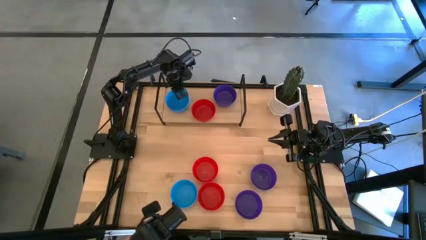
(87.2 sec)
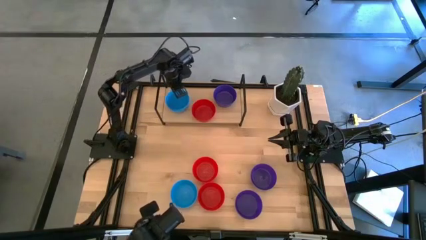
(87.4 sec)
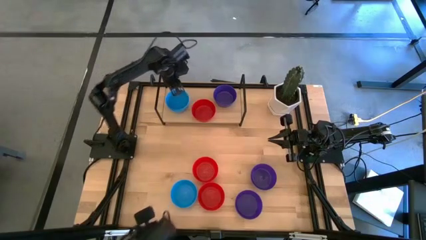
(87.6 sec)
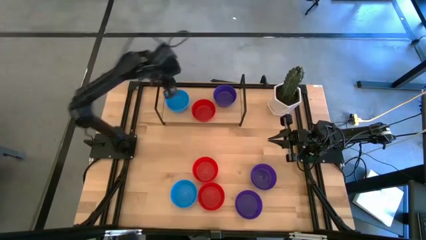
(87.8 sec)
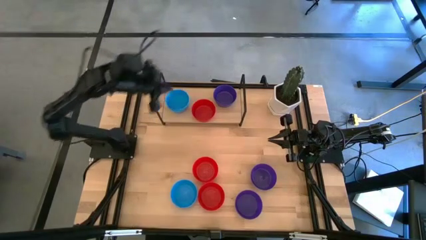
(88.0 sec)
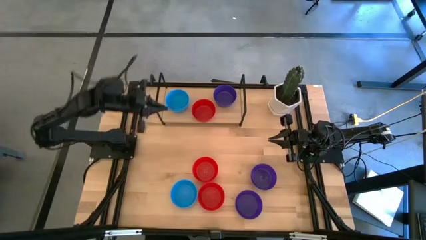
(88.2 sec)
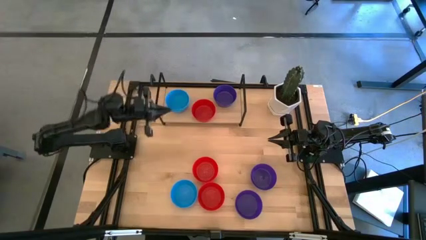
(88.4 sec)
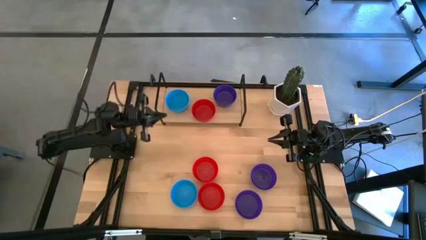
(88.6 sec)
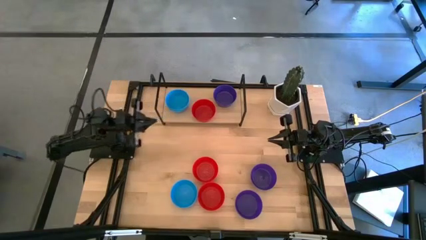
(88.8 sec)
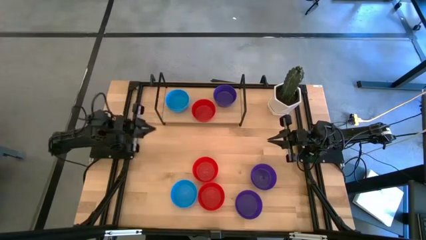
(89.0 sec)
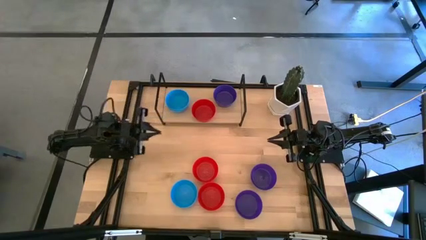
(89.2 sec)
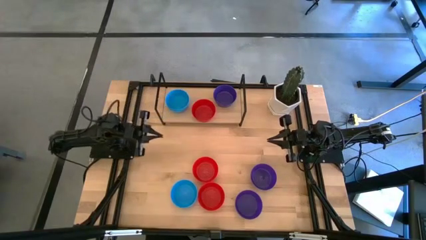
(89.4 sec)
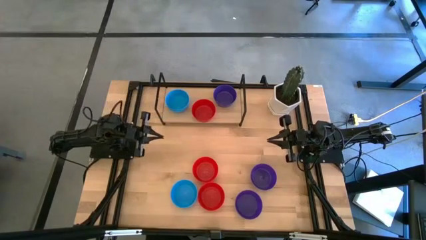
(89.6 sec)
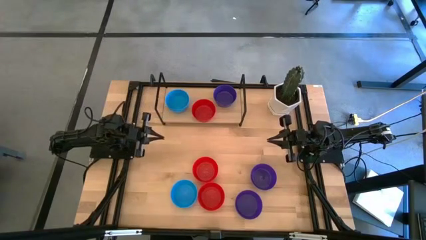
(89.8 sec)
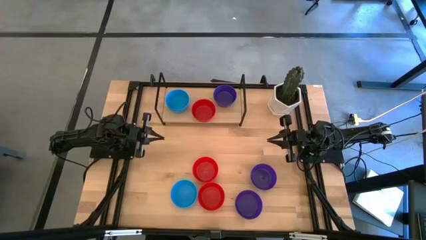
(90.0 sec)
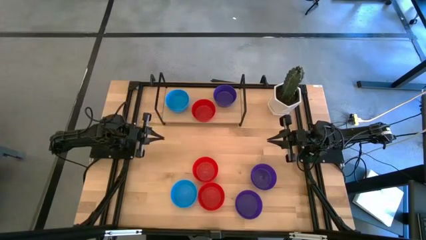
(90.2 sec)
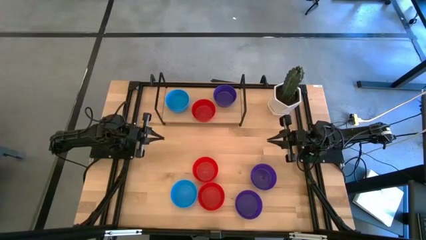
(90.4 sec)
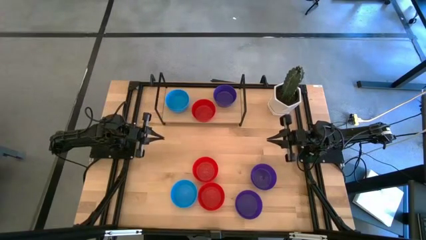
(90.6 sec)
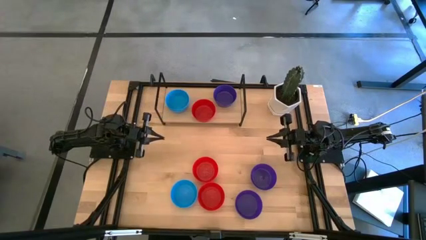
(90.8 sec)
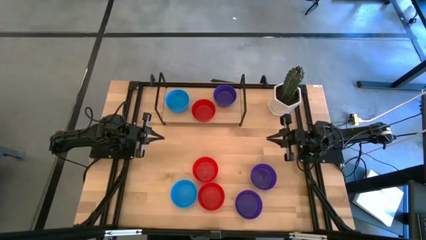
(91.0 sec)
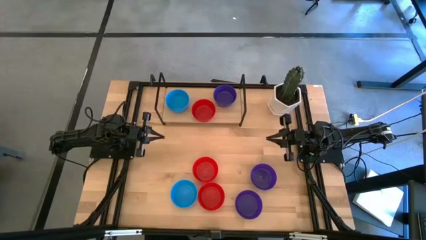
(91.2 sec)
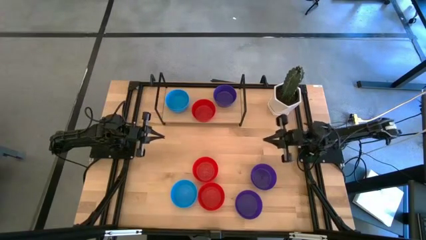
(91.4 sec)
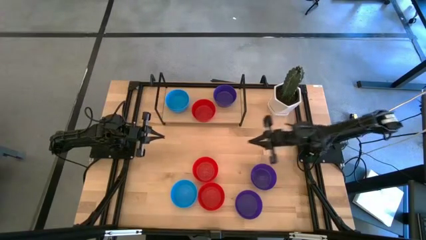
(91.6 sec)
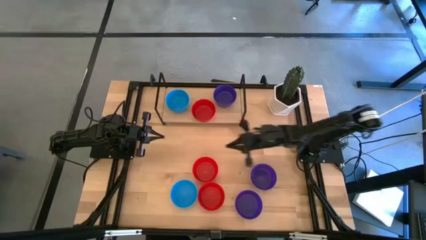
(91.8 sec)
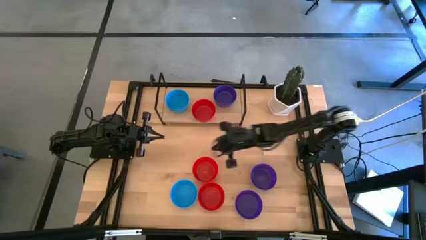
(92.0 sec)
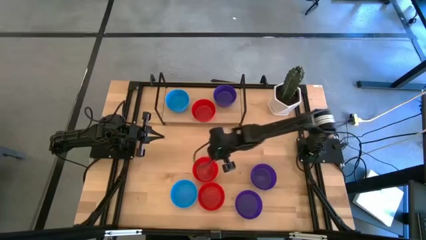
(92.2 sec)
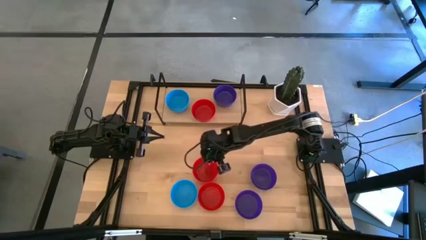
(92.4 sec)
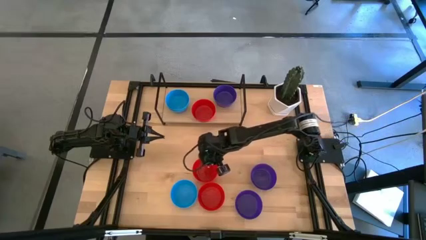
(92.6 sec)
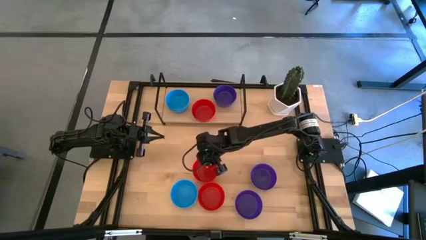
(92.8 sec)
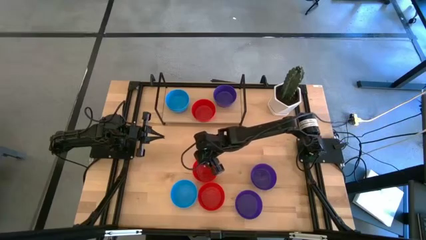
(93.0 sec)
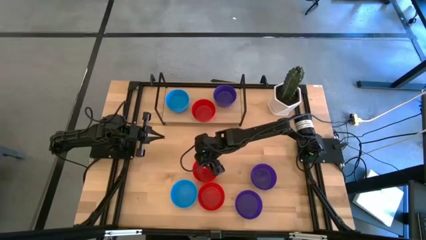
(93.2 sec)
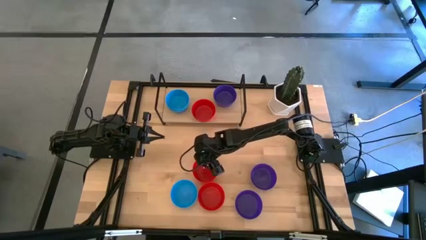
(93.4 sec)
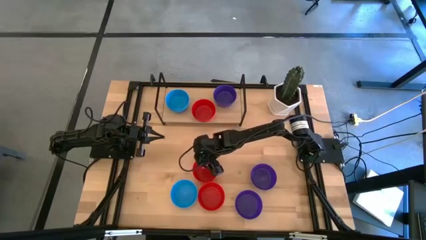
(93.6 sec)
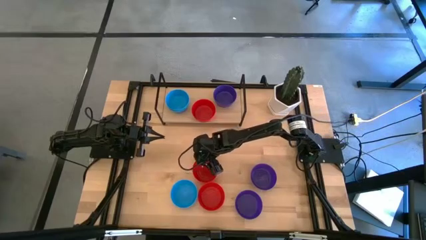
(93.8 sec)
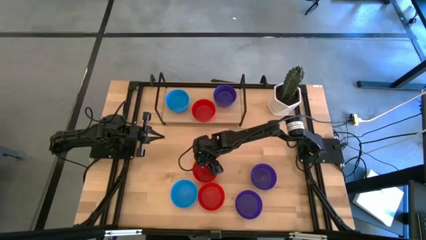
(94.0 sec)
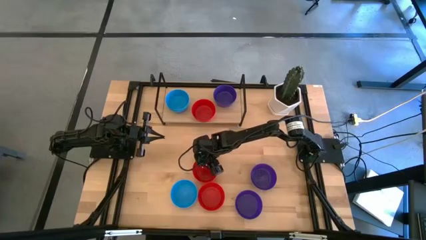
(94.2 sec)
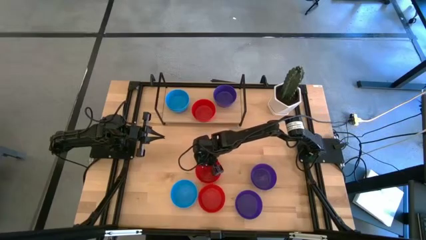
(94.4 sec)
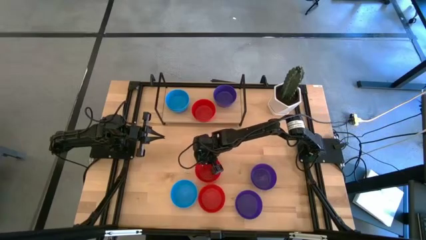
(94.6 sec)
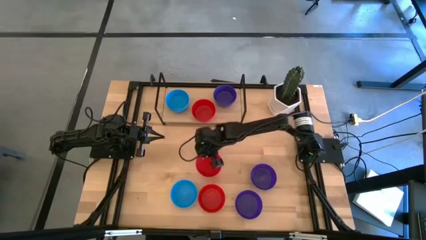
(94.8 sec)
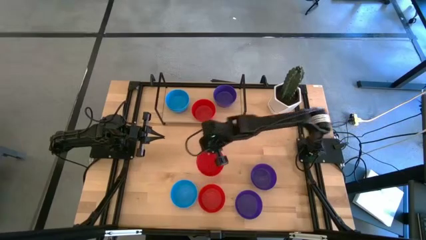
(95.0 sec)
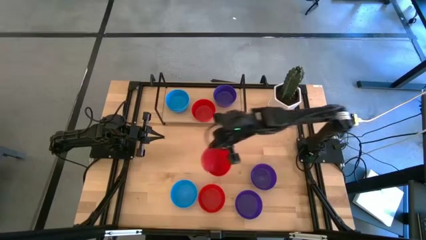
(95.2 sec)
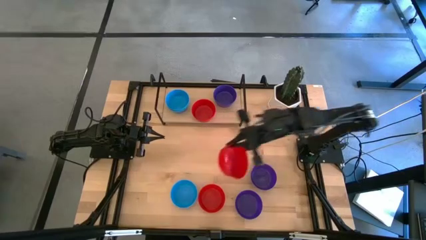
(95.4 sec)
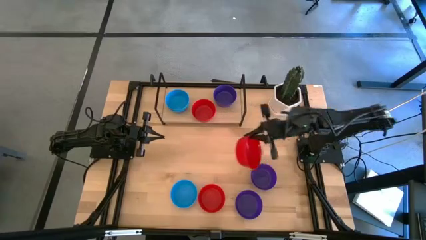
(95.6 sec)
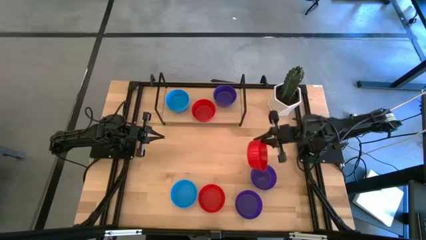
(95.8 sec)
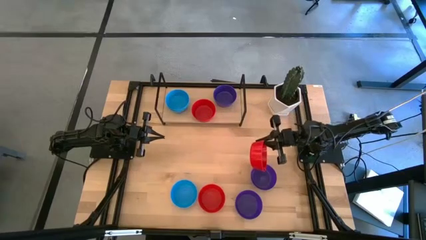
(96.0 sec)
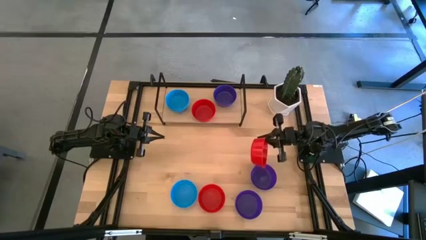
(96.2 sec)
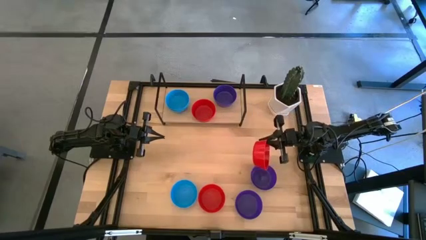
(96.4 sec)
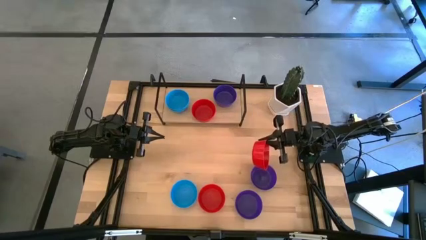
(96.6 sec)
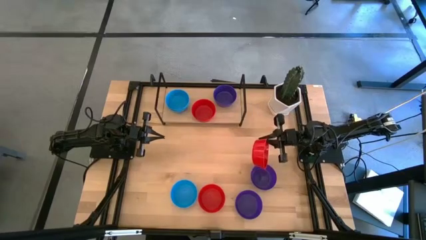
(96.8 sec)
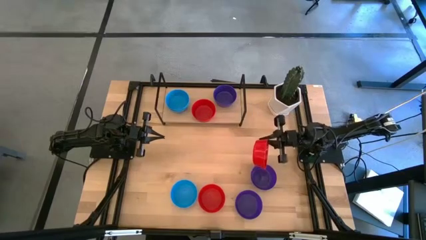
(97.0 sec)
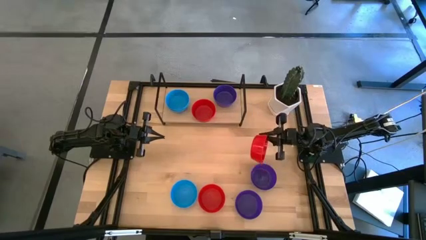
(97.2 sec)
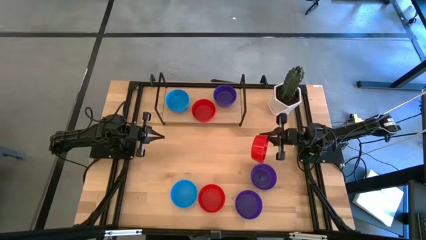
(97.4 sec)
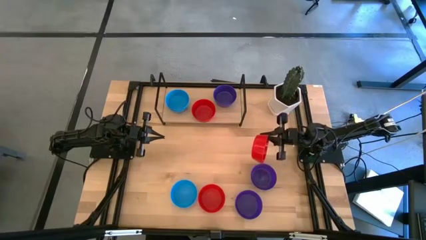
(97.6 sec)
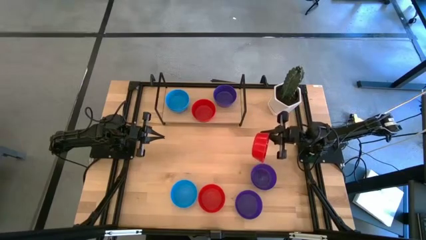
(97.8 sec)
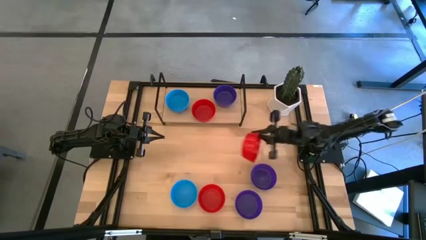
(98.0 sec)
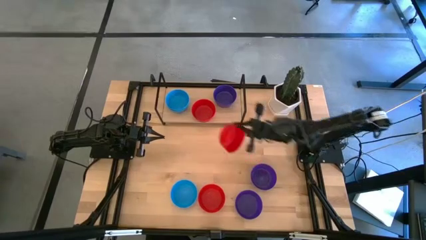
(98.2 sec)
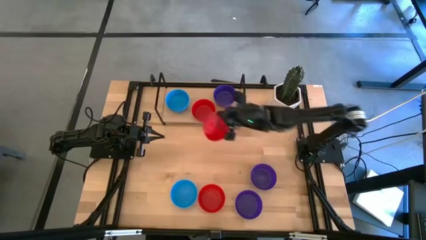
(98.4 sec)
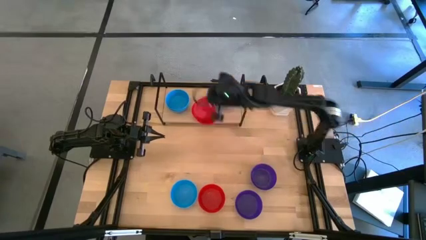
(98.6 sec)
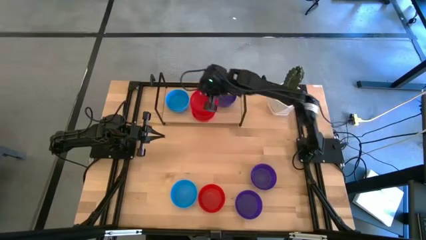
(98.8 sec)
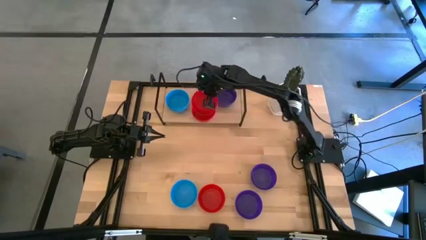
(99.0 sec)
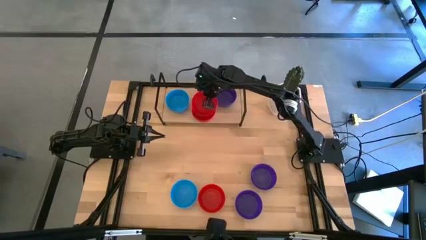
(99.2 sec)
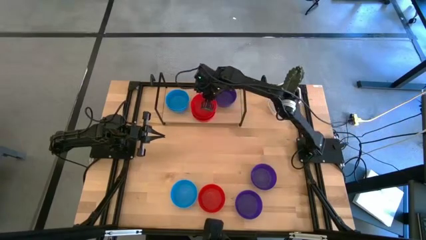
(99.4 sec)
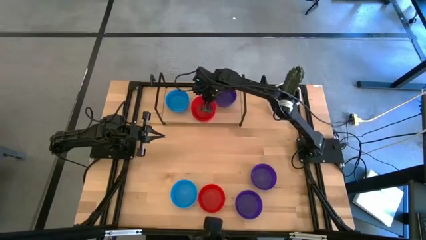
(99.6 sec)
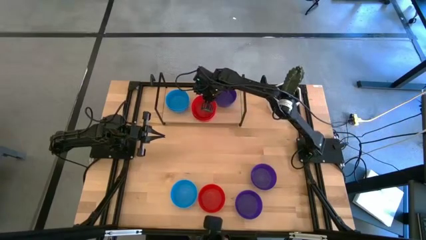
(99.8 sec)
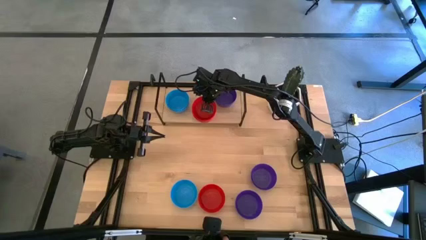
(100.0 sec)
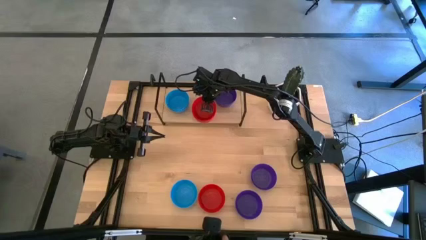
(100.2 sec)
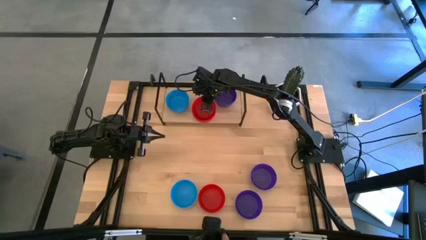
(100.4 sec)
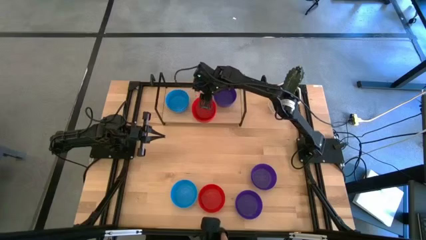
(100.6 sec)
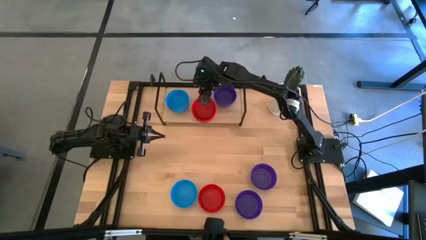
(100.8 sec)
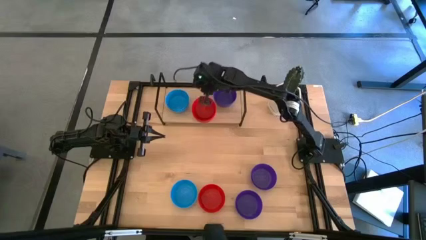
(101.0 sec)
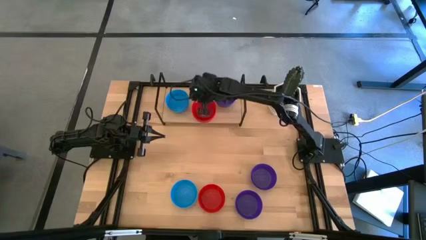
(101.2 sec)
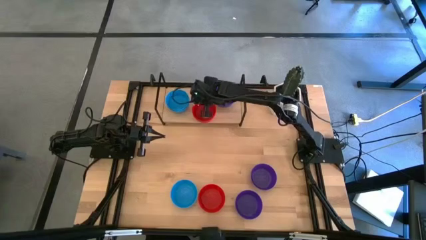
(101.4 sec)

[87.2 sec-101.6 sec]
Task: Pick & Place Mini bowls
Stack the red bowl on top of the red bowls on the shelf

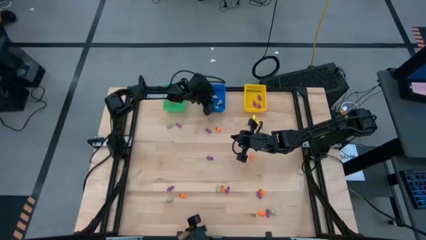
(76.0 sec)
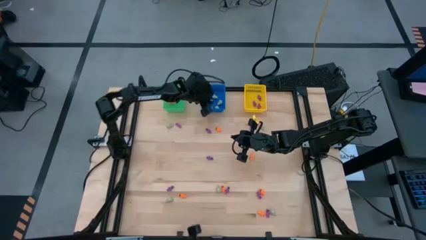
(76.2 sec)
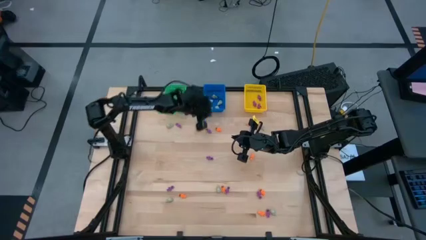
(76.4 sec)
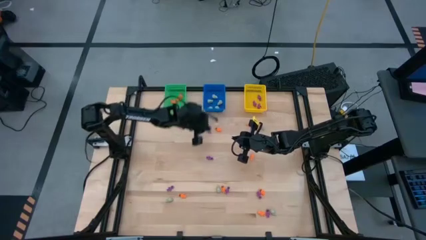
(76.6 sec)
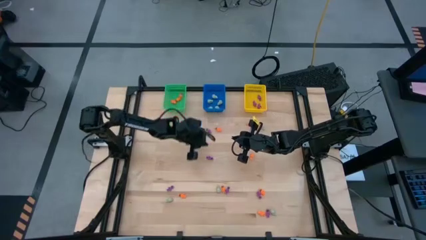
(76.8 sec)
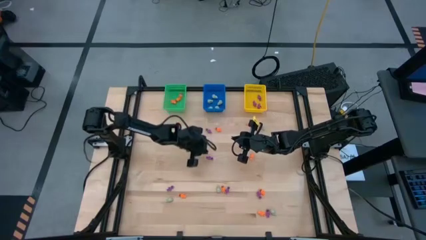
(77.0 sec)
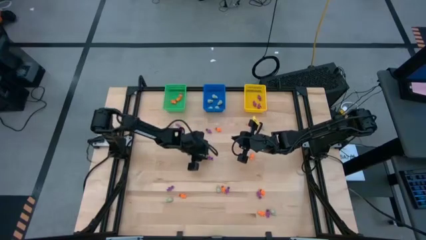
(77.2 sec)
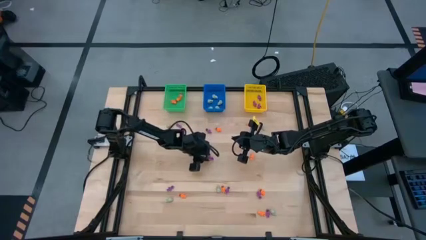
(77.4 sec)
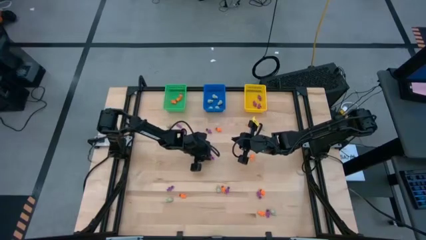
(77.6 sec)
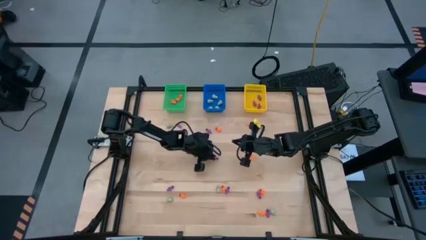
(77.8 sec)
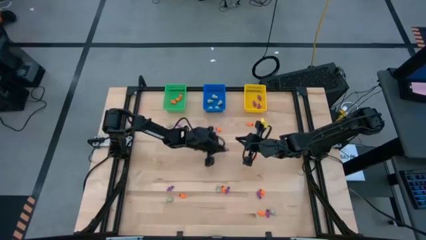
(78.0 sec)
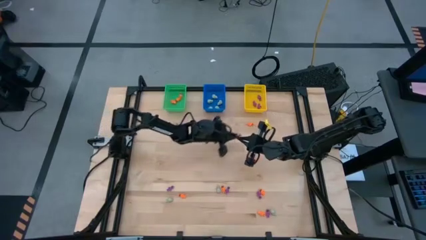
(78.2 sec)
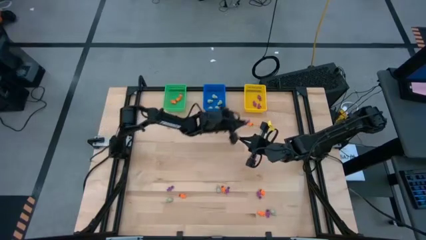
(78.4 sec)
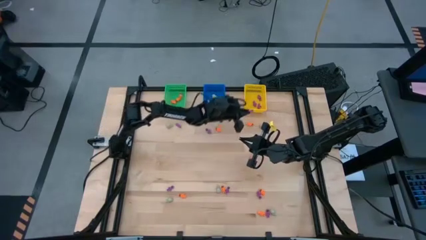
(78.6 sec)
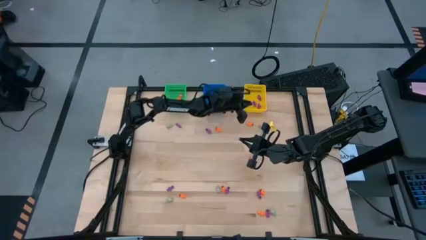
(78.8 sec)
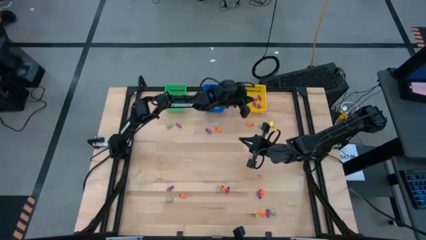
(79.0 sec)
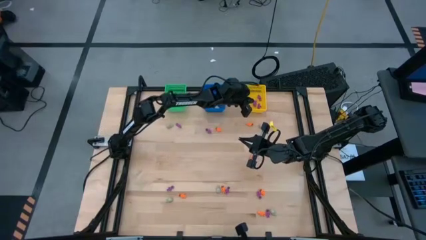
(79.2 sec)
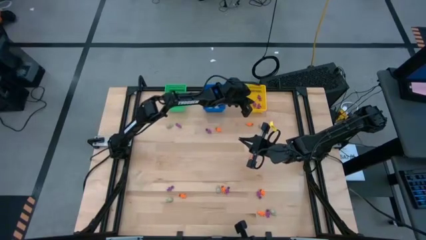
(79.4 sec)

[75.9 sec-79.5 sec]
Task: Sort Halloween decoration
Put the purple skeleton toy into the yellow bin
